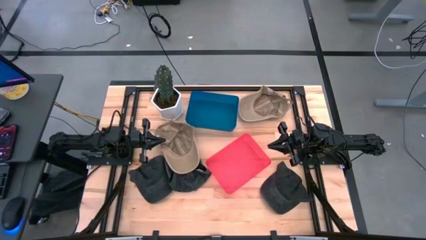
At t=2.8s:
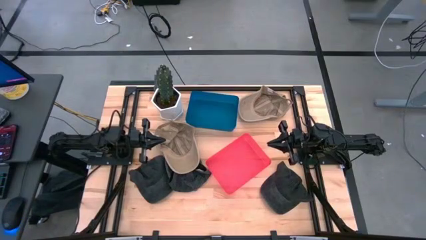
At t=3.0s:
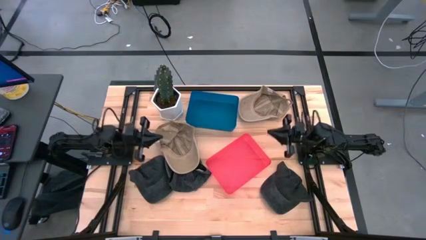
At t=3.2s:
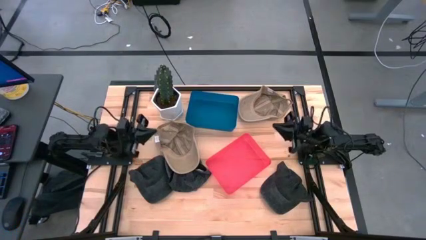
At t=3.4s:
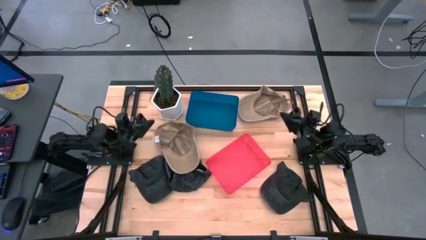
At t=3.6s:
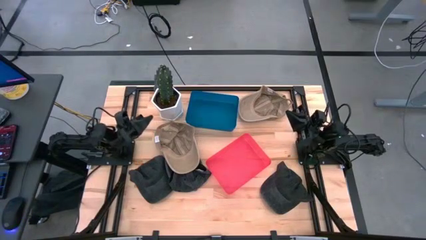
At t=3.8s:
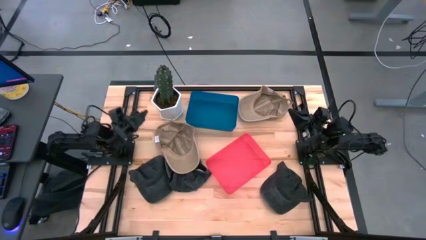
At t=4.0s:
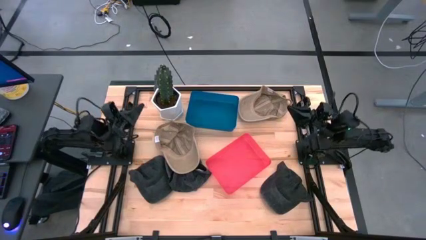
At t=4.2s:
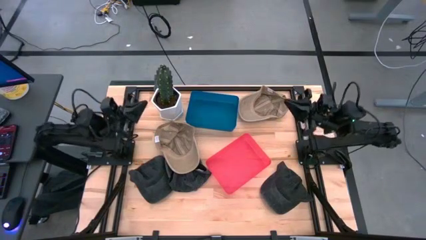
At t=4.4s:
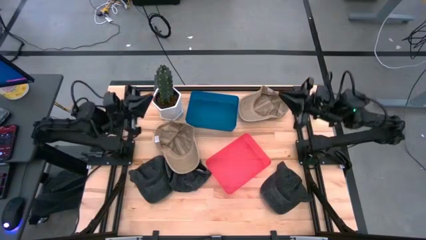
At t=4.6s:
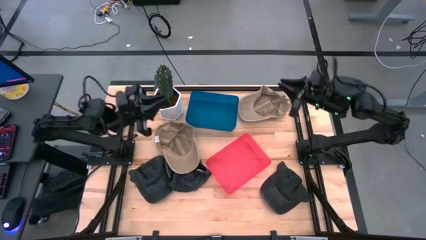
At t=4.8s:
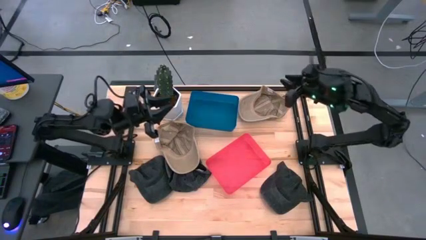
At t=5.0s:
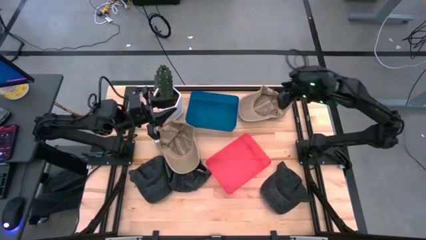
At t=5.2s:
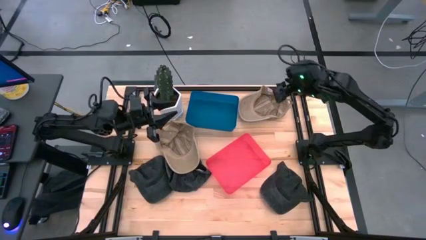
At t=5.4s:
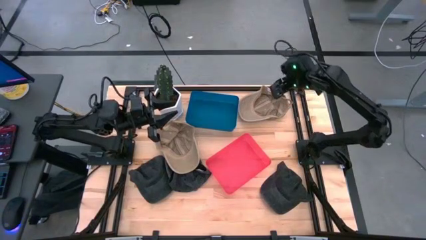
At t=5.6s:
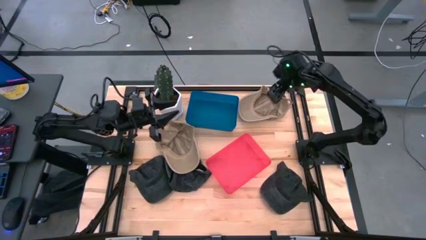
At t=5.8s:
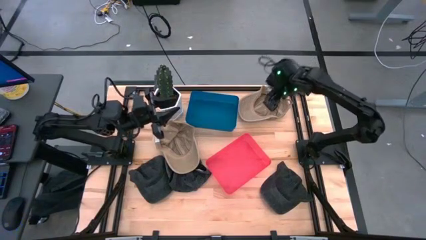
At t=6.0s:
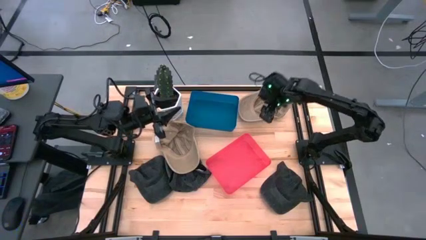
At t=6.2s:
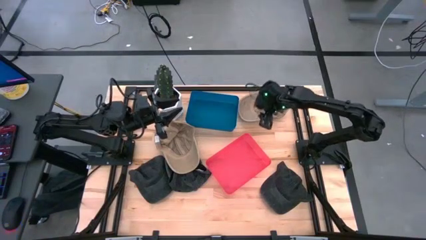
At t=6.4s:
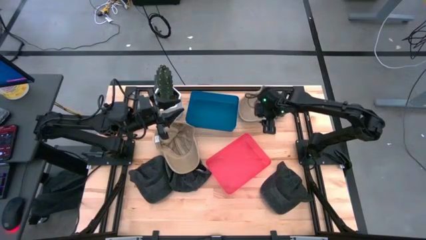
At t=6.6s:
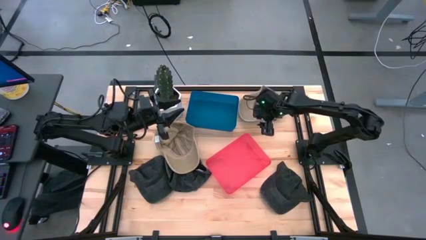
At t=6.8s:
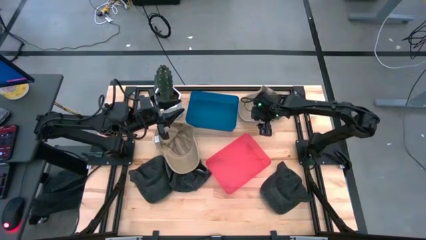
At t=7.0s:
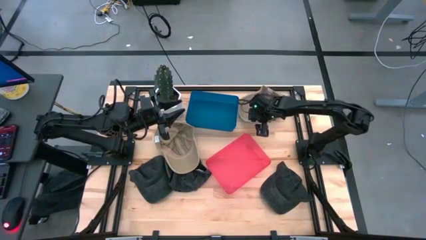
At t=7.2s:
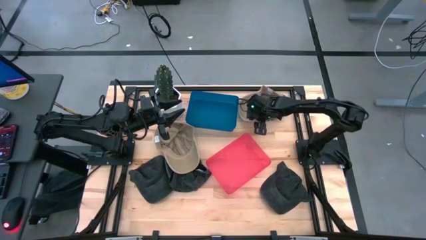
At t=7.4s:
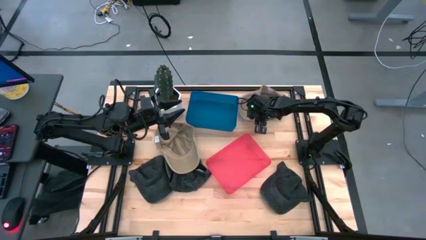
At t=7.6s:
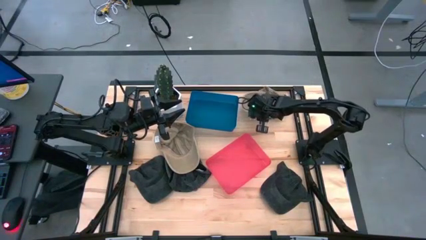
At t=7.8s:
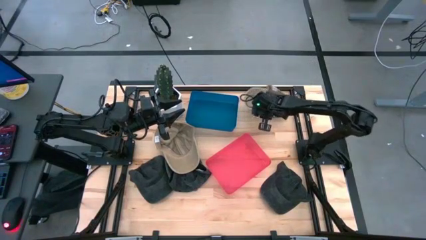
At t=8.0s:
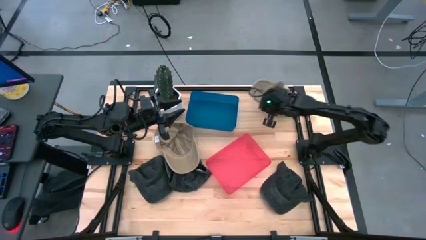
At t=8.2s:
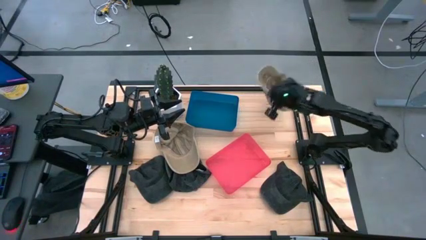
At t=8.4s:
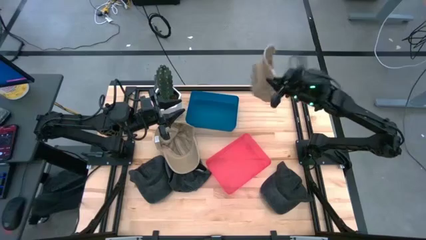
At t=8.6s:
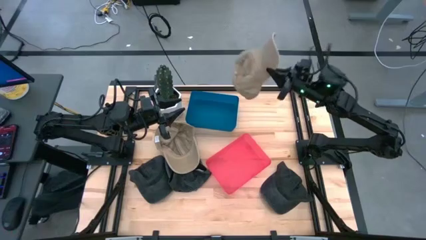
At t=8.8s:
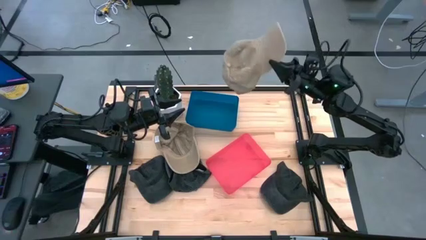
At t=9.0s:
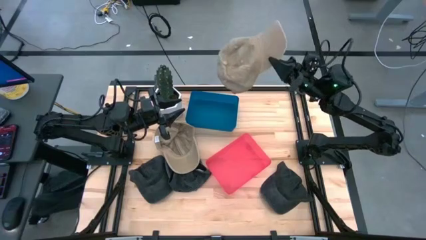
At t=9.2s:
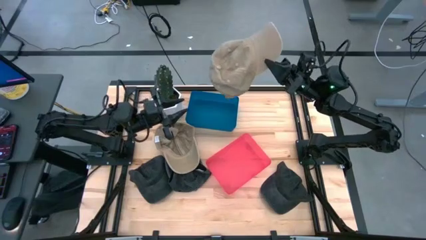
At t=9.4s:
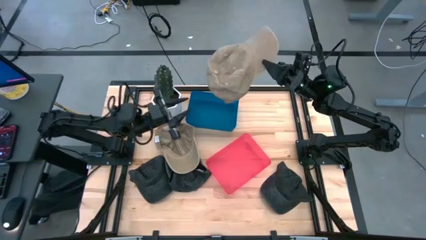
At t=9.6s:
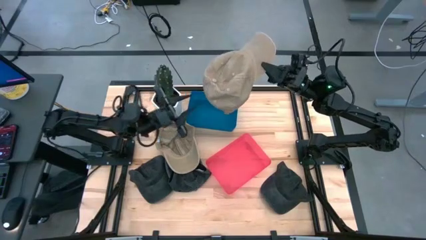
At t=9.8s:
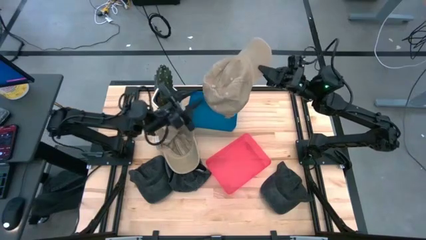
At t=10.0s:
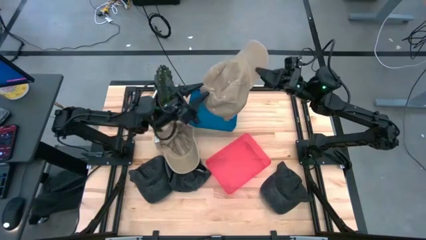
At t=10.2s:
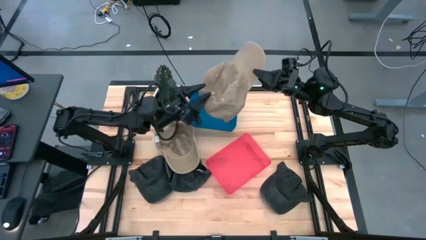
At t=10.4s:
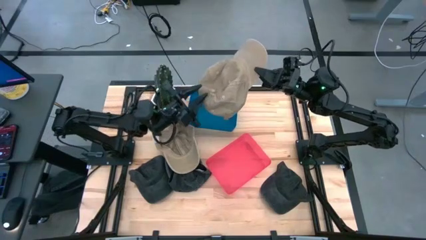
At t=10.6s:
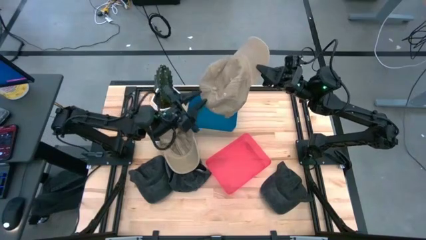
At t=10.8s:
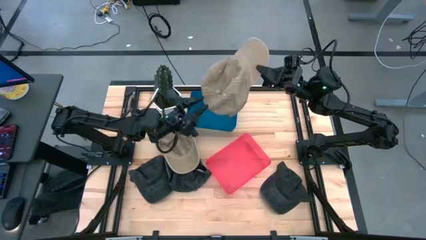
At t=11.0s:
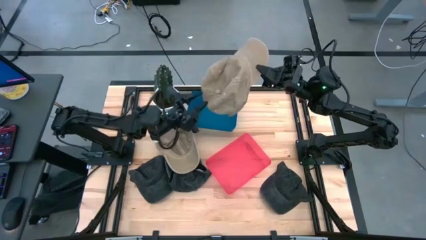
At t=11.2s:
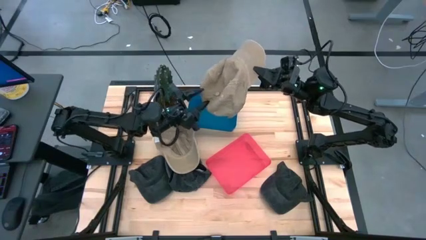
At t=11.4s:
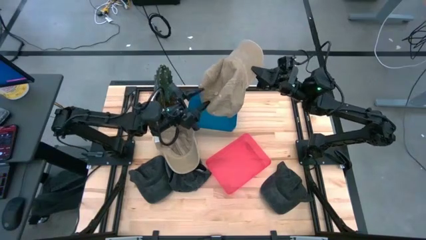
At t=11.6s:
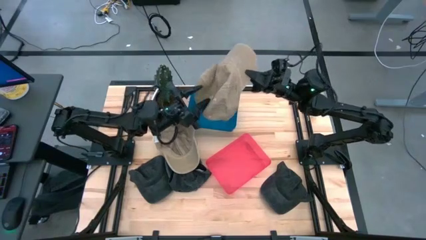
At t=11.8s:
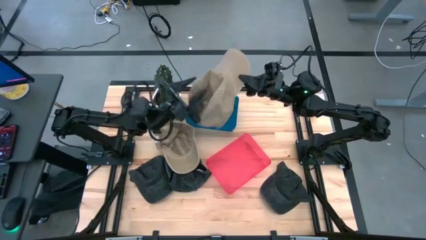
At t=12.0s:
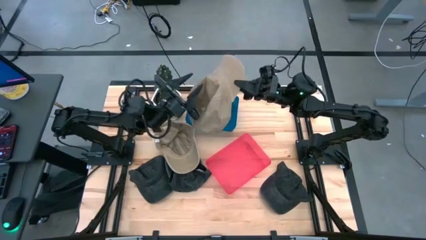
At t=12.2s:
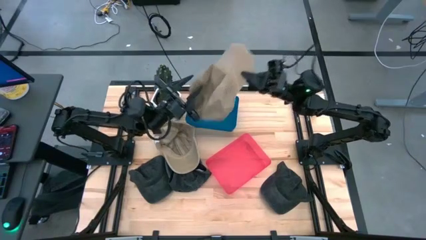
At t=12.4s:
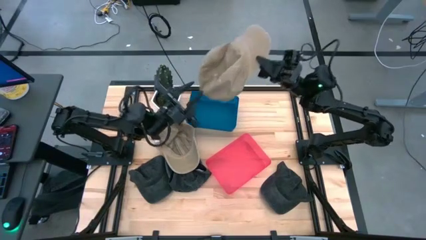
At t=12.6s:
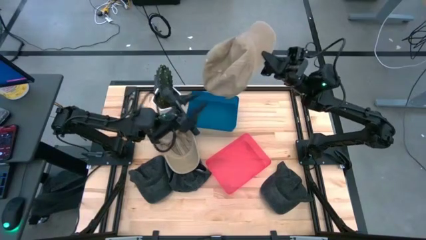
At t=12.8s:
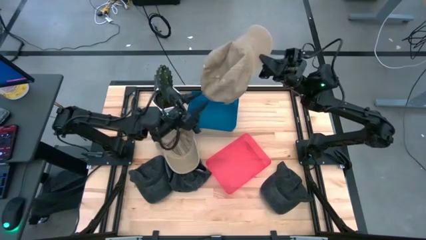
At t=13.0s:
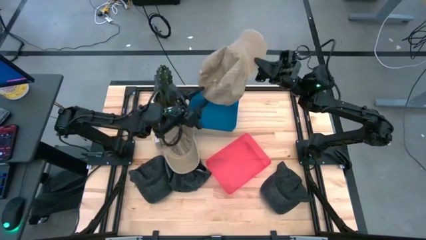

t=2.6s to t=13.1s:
Task: Pick & Place hat
Put the top brown cap into the blue bin
